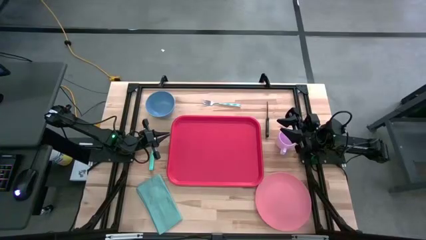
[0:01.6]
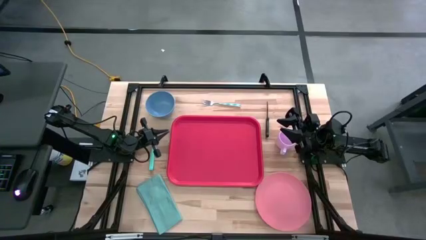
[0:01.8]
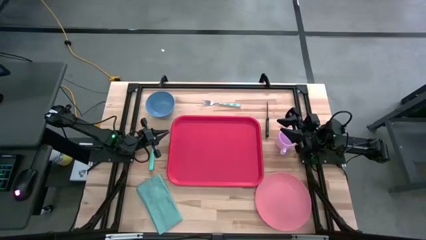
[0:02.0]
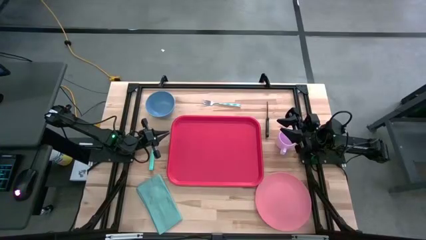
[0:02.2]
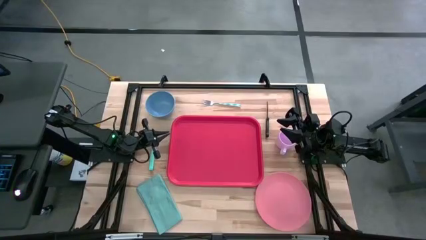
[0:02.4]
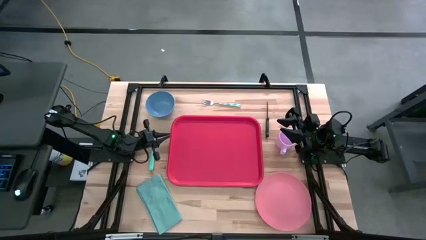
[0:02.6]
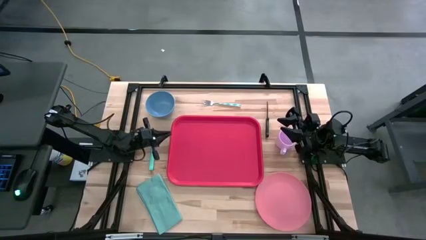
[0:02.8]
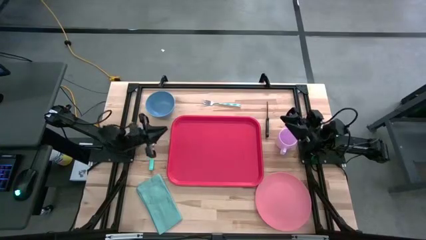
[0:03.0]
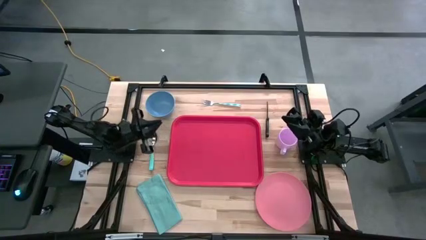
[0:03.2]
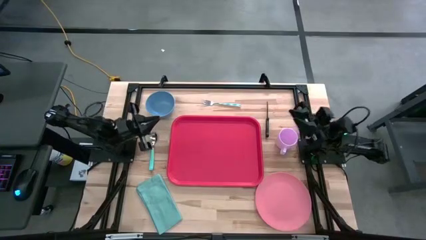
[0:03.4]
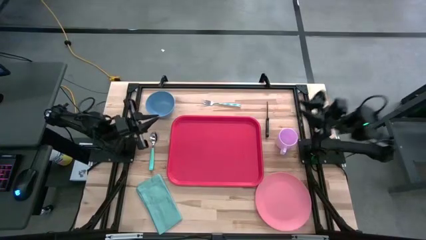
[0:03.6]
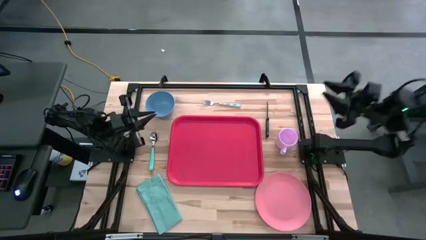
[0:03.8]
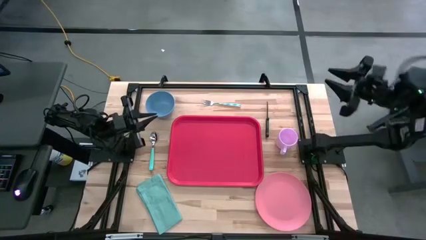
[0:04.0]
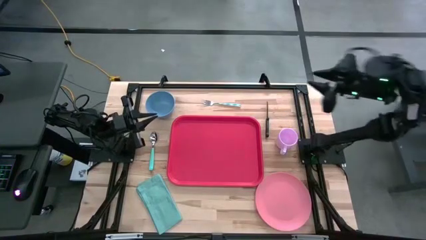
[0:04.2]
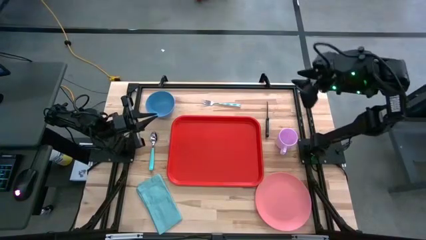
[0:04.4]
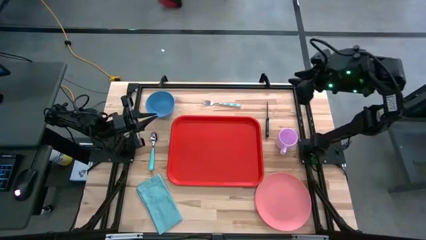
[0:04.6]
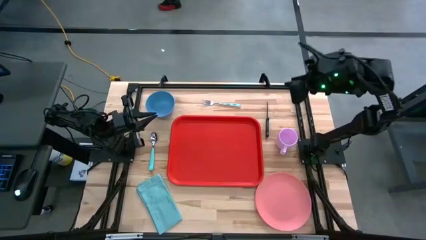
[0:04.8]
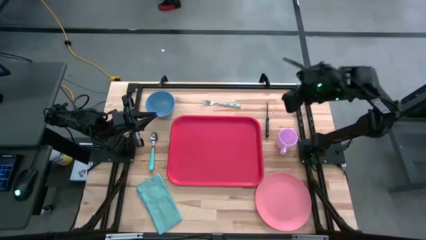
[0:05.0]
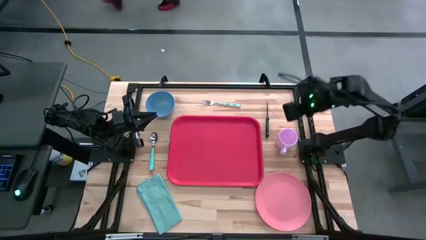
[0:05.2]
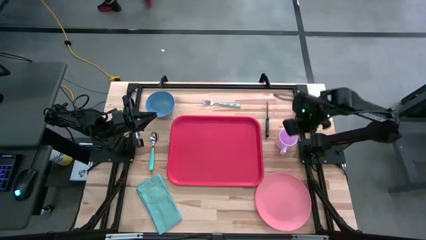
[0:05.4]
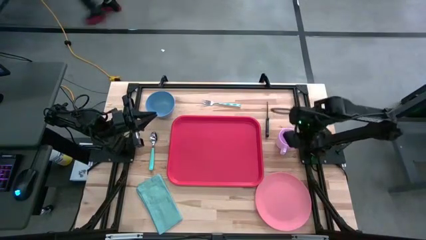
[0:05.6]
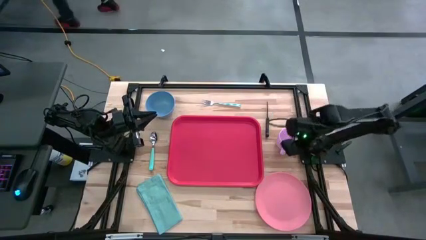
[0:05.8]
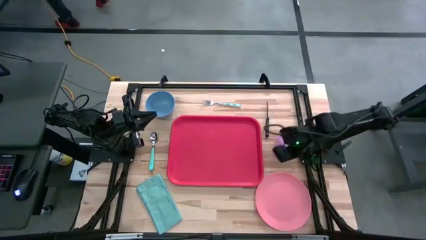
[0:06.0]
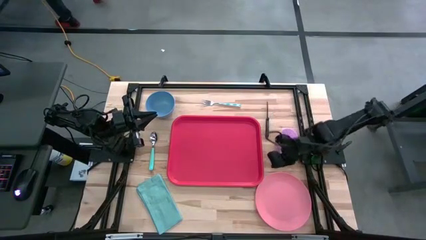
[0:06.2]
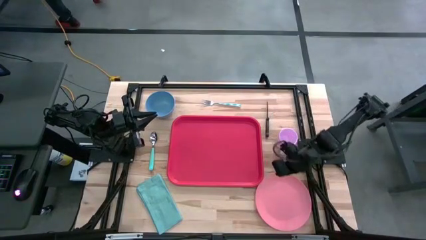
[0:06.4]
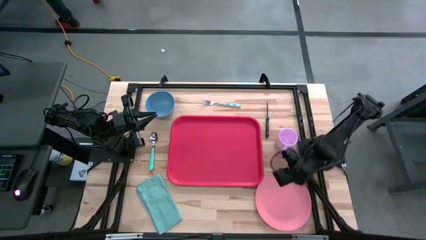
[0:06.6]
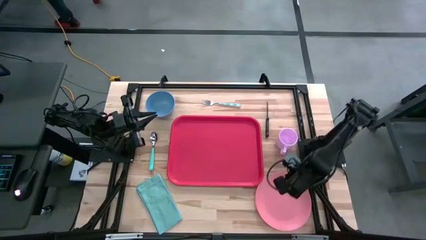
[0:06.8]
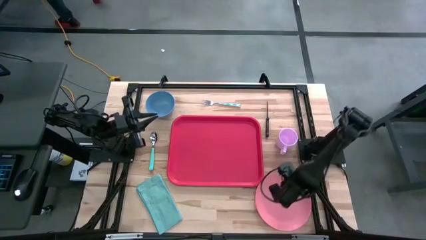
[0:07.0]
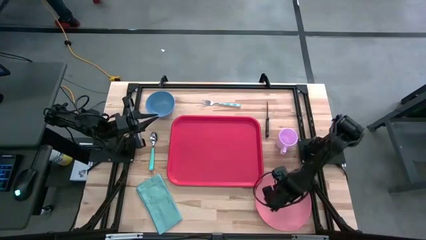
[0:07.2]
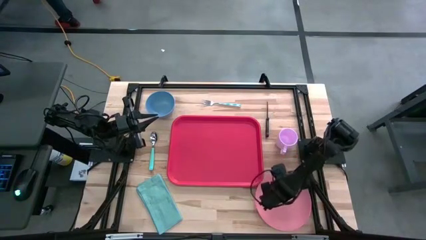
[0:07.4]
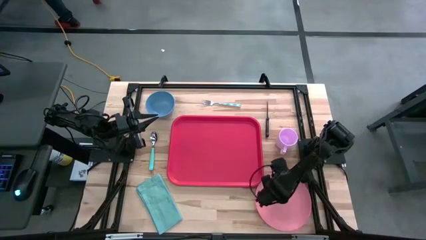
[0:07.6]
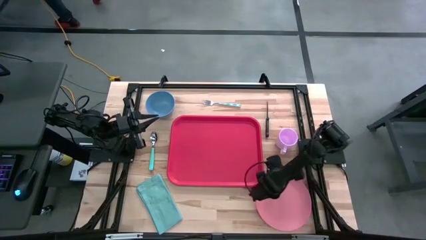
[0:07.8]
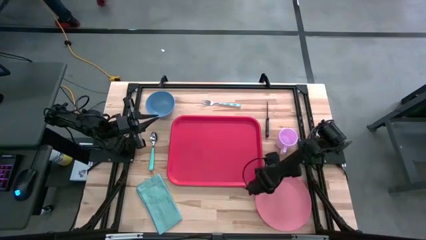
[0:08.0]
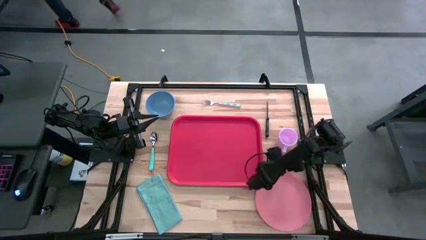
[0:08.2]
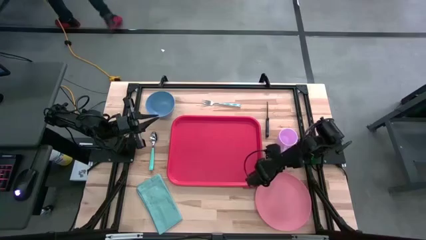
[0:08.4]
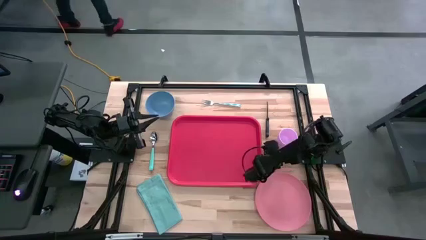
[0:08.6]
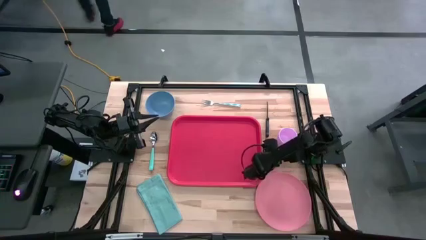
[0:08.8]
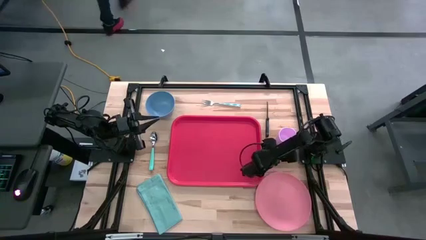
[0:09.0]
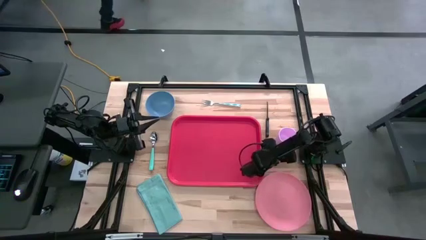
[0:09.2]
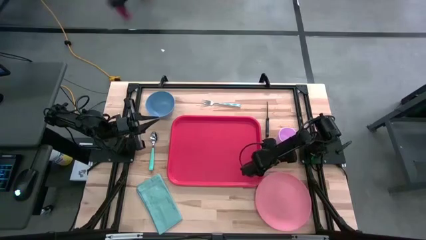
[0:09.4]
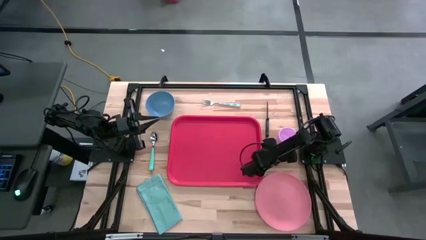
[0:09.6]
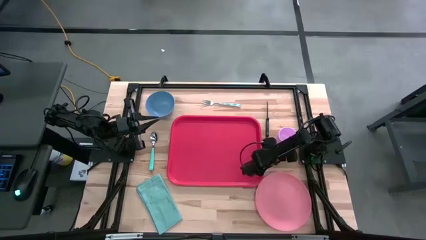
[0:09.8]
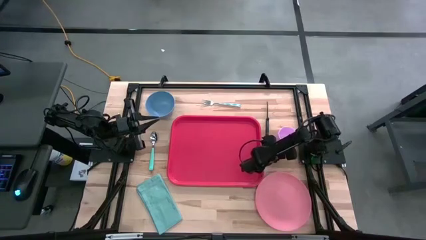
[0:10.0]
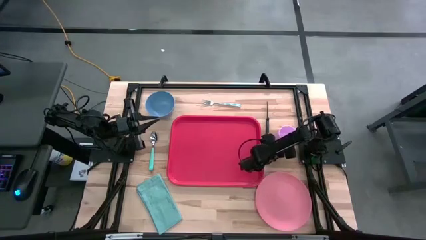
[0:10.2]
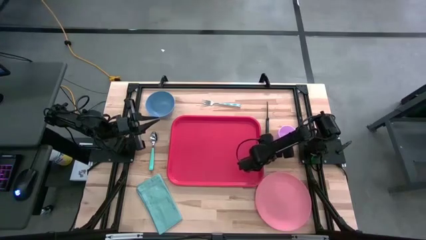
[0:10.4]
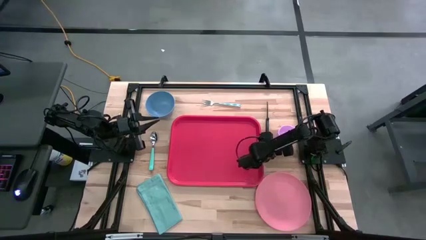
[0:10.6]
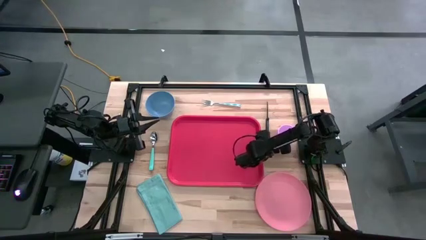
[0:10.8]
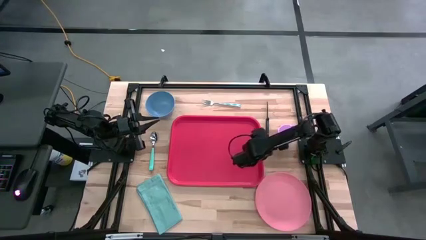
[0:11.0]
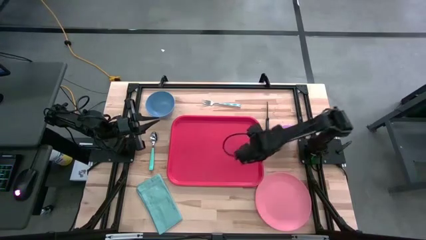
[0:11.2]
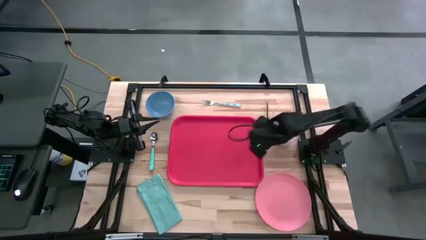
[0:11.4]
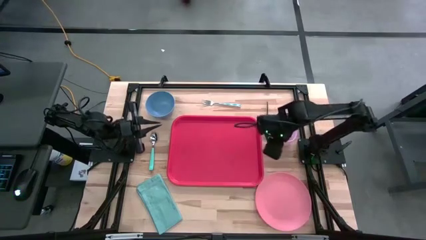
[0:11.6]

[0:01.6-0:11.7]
Task: Set up tray
Put the purple cup on the red tray

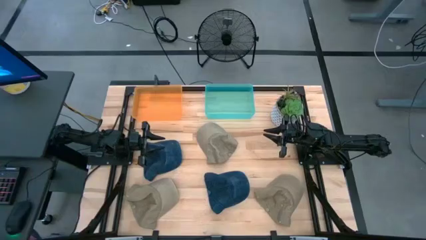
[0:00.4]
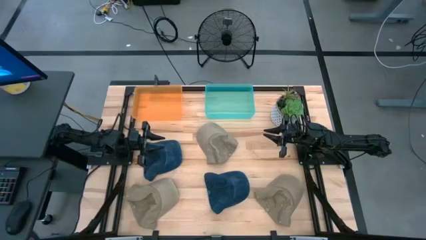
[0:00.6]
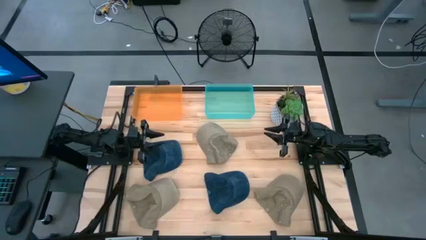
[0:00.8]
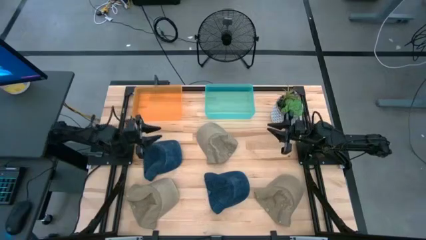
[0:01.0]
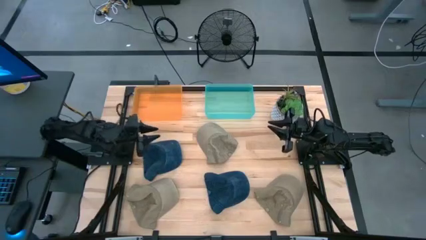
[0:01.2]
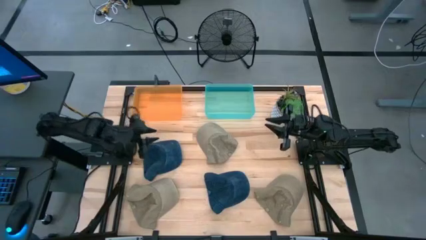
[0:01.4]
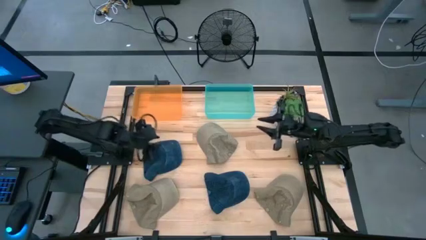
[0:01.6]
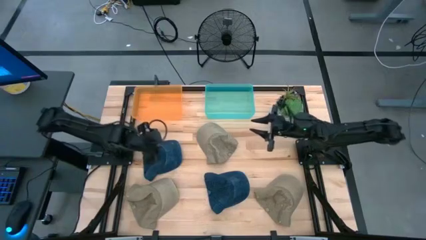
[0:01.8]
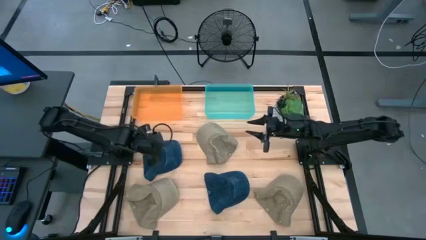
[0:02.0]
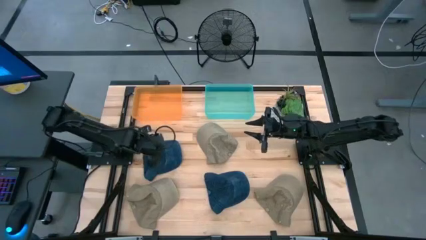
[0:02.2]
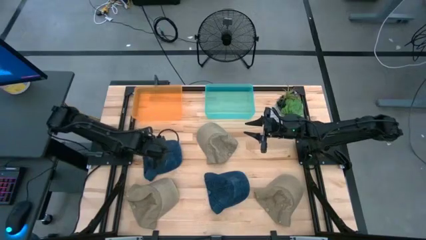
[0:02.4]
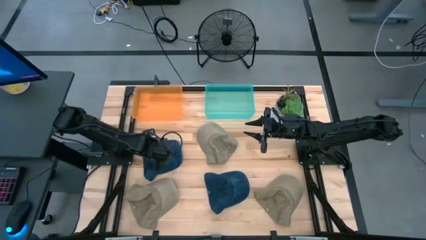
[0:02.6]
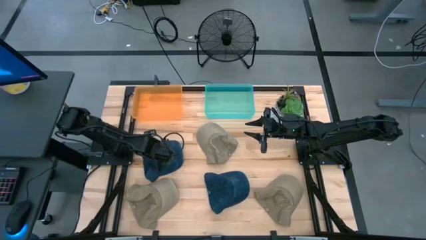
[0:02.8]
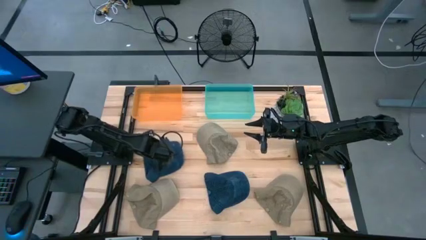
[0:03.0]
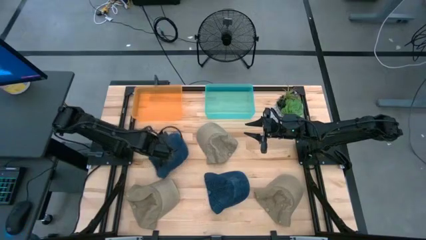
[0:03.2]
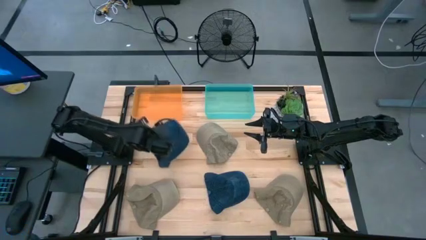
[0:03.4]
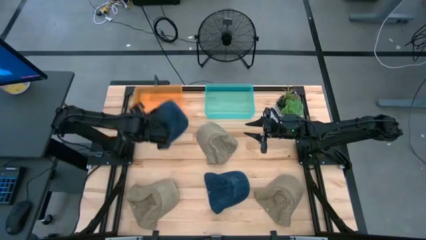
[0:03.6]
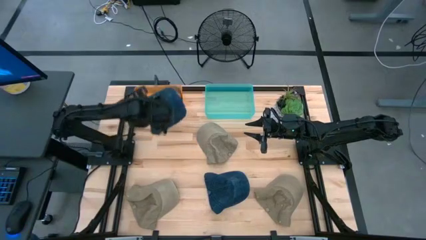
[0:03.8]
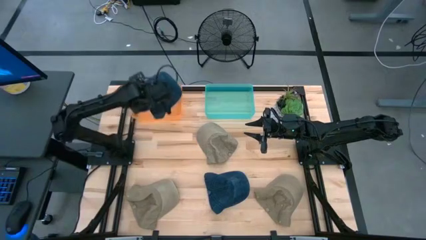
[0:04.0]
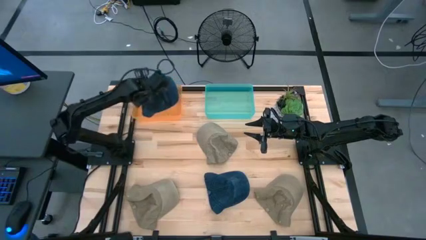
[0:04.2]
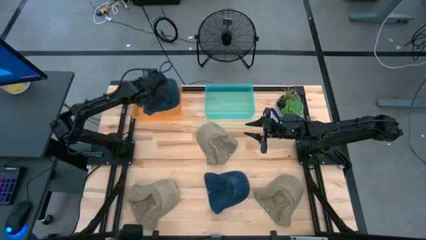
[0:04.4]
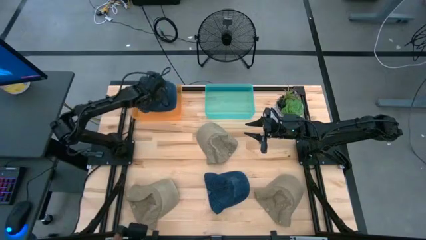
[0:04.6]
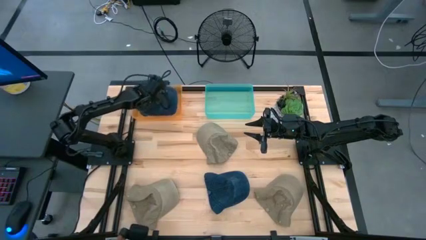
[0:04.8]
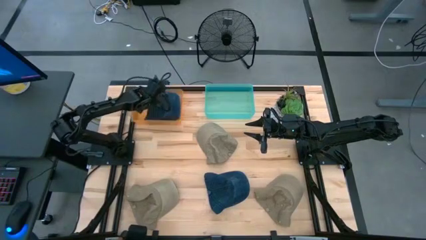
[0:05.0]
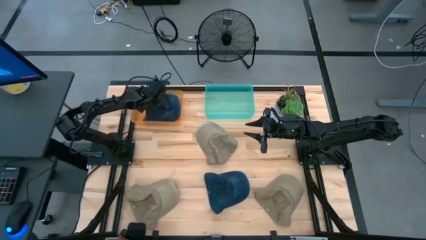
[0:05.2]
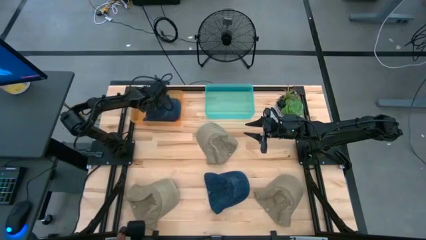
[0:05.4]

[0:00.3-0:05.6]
Task: Pick & Place hat
Put the top blue cap into the orange bin
